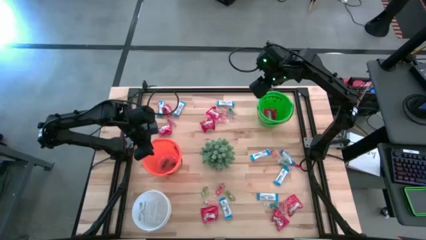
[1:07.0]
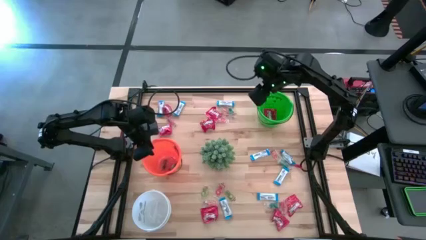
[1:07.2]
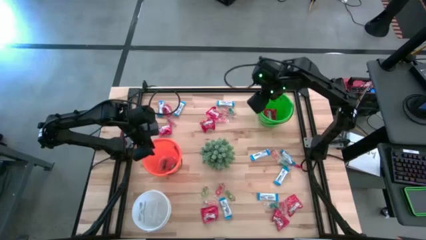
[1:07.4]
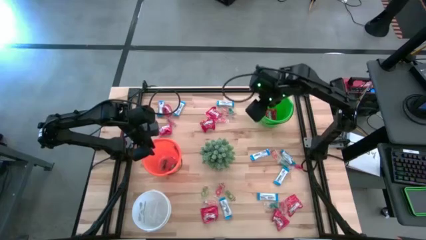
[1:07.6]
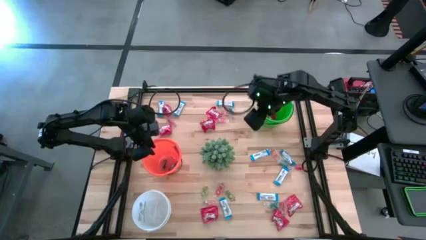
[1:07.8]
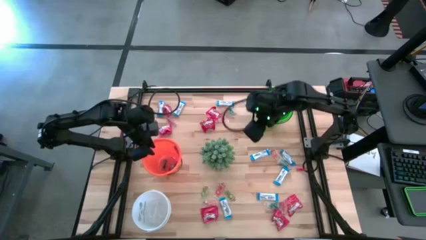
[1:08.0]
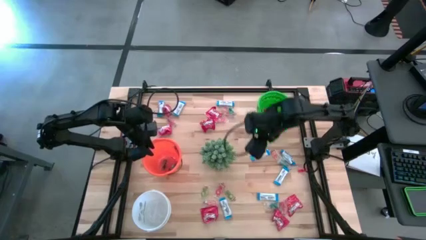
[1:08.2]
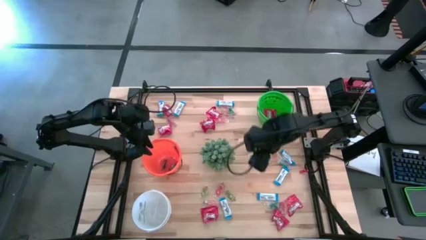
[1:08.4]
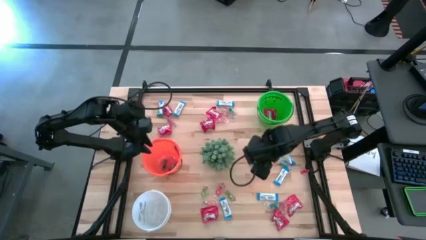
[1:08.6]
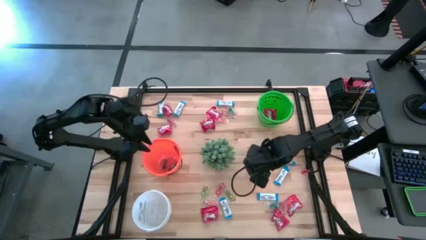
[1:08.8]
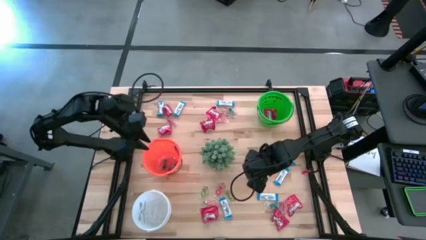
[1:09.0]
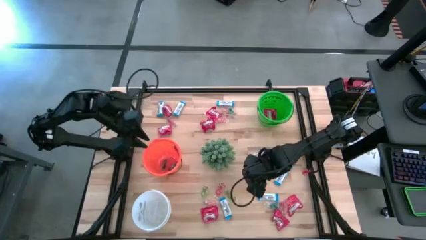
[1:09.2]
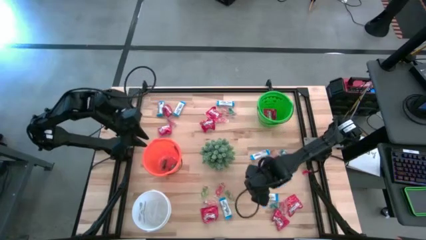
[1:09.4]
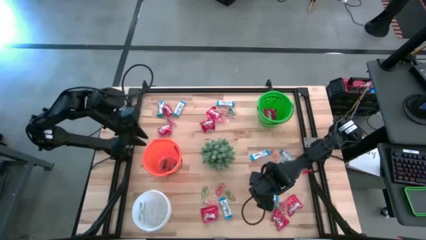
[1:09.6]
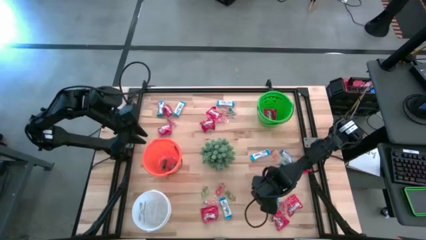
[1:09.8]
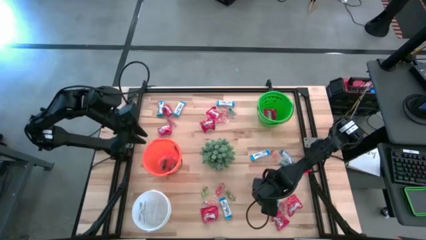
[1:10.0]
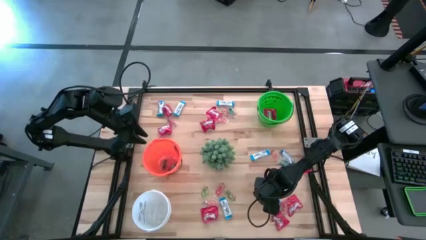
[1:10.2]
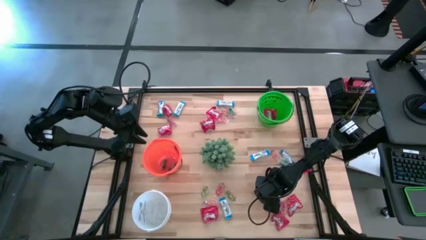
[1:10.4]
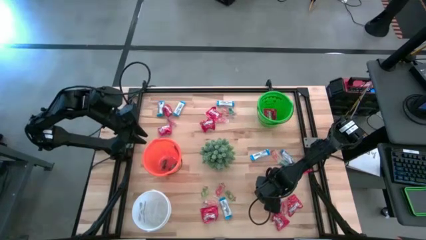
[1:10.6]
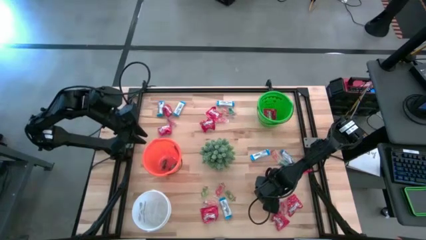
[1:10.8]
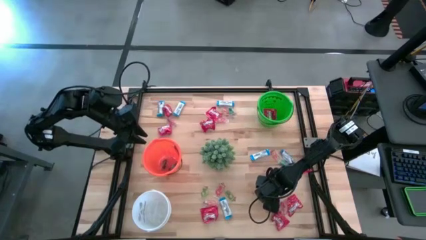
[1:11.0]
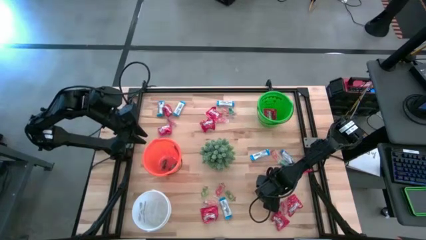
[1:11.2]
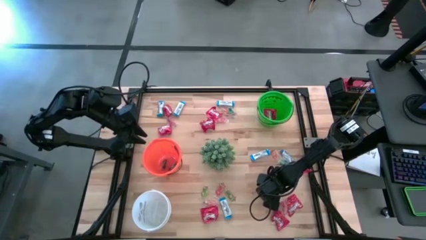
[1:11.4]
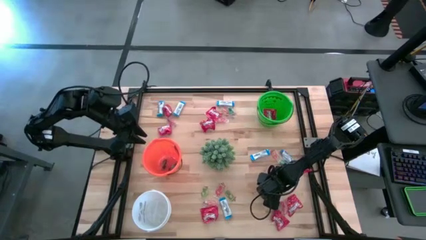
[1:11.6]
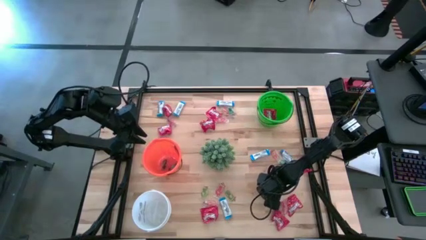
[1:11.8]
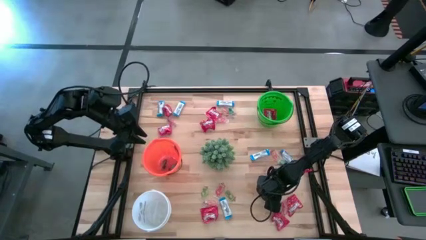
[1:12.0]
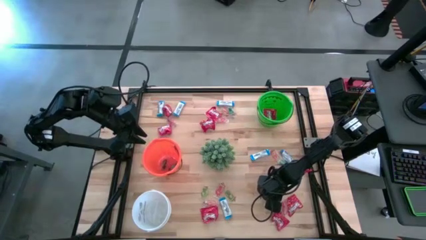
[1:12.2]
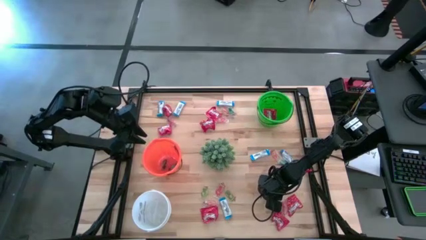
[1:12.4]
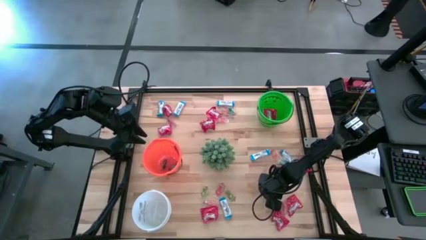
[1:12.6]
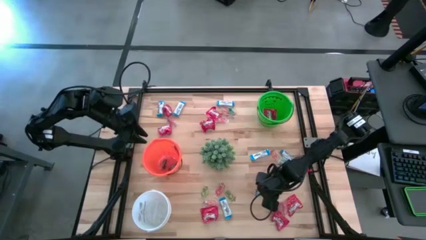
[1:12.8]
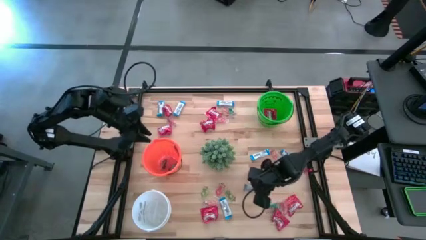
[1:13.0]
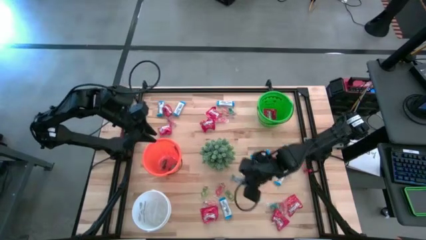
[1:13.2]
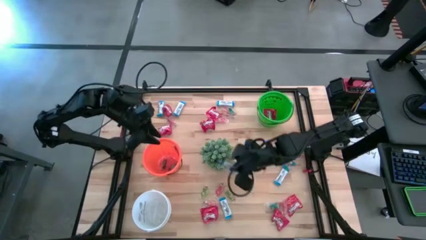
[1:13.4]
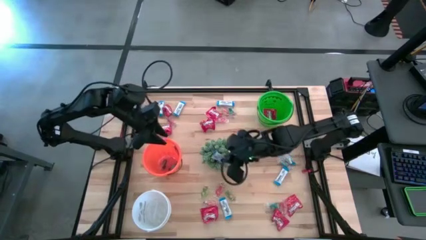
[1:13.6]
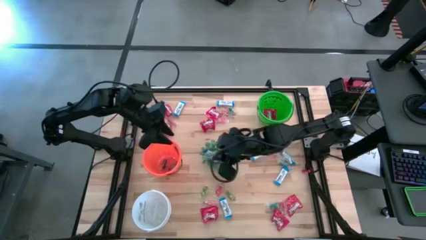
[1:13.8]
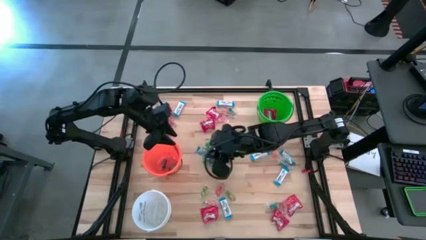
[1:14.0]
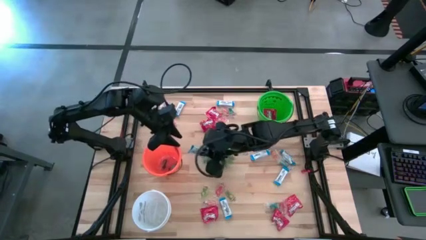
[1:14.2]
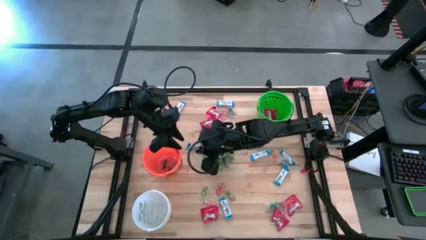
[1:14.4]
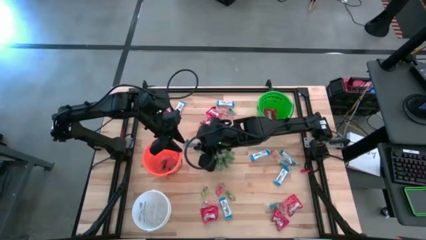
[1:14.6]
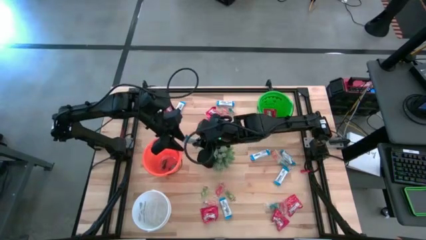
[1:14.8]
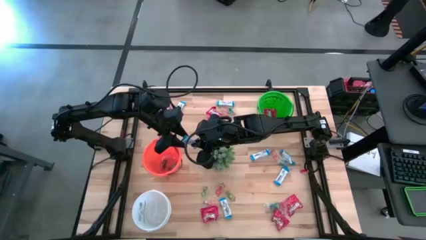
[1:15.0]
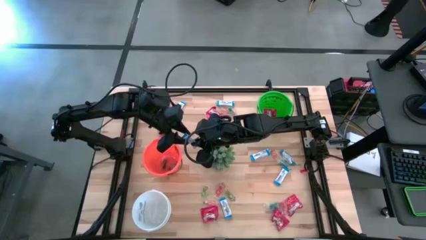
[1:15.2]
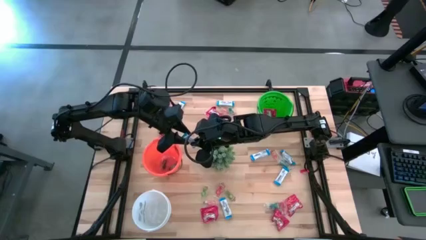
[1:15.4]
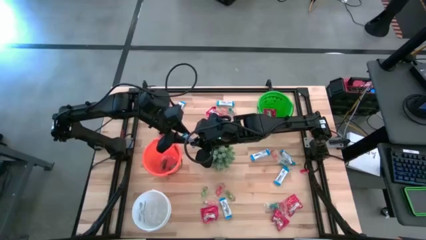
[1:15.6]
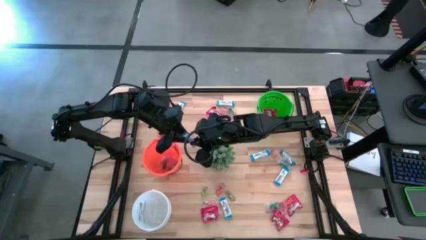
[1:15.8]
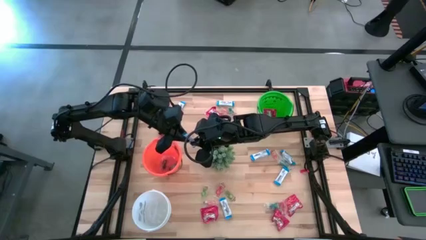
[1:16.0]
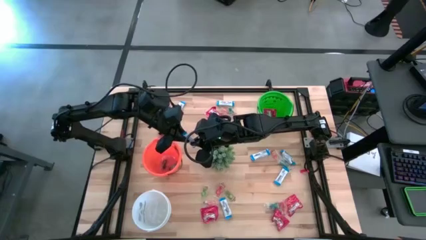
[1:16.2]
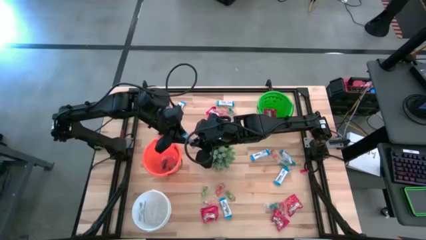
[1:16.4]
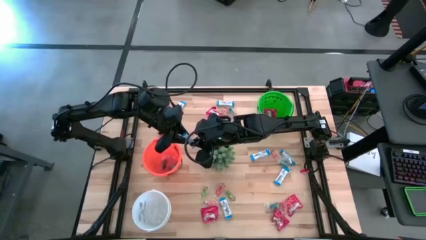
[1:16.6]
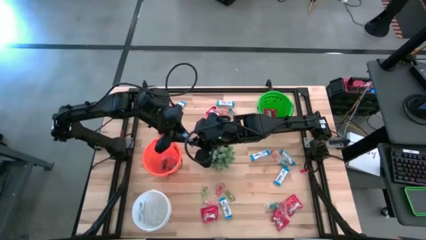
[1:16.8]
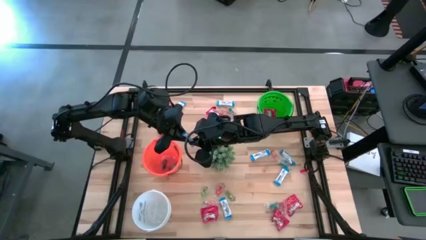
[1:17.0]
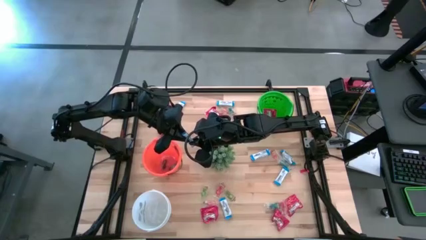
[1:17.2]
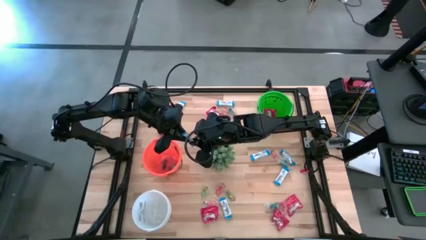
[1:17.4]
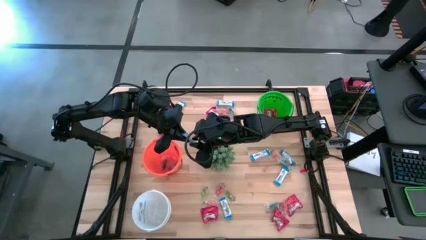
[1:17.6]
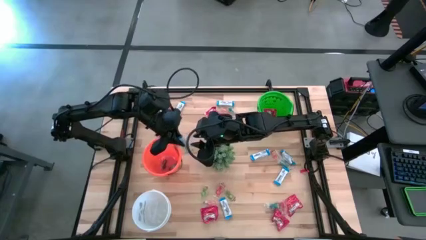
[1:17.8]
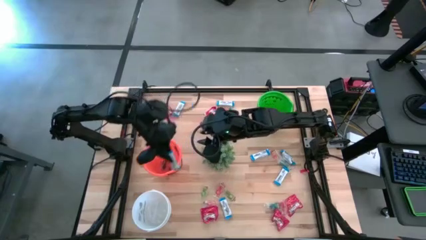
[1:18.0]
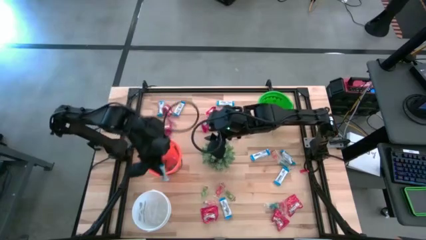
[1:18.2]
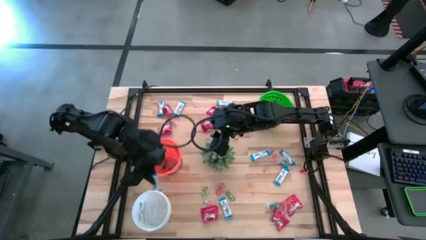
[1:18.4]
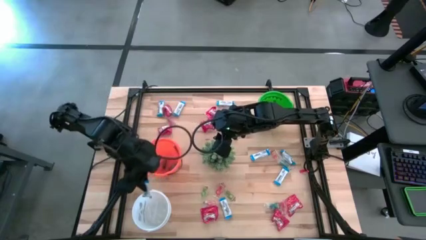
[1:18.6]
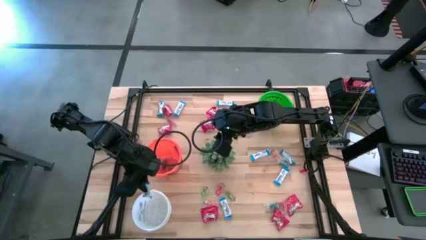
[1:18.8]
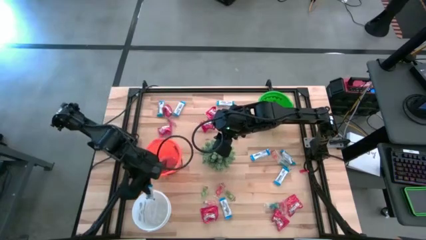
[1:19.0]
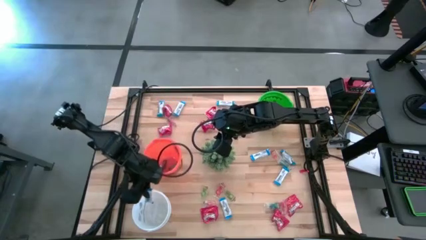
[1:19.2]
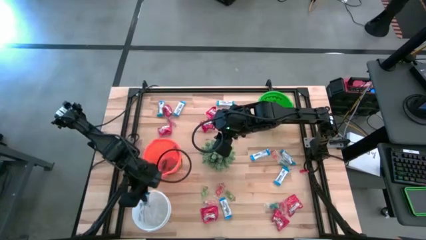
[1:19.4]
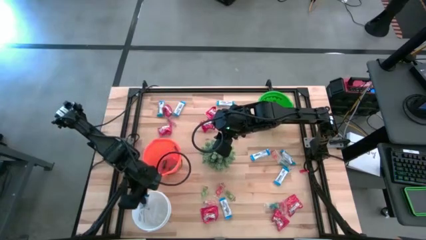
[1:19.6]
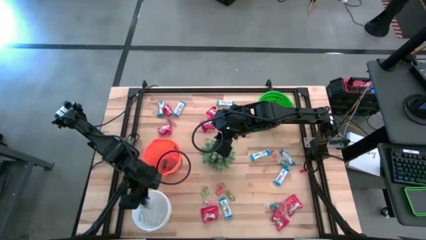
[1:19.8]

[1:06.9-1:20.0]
Task: Sort candy
Put the white chocolate into the white bucket

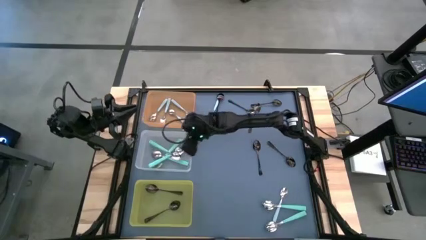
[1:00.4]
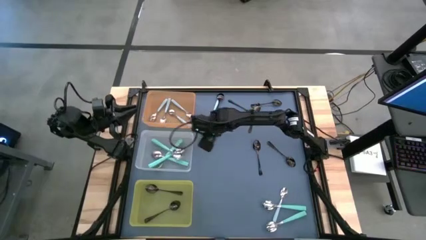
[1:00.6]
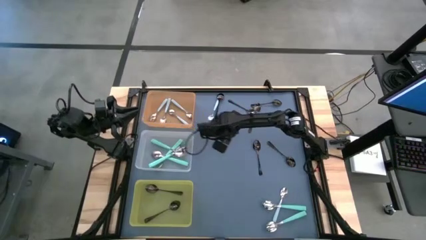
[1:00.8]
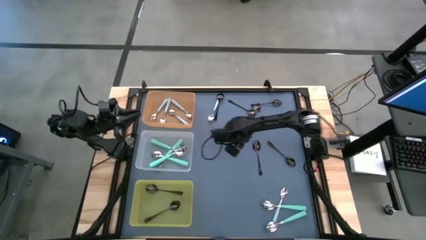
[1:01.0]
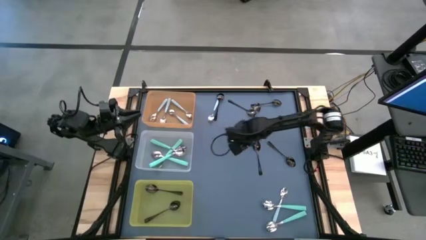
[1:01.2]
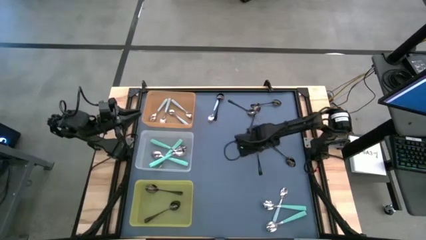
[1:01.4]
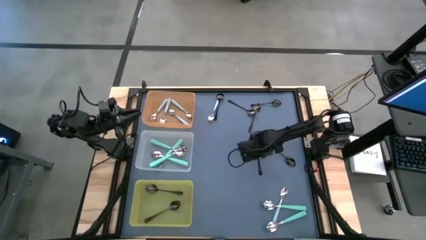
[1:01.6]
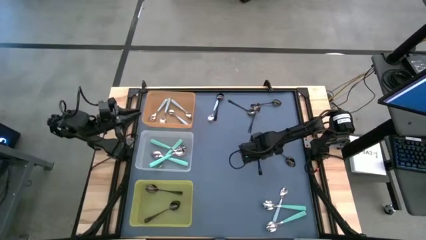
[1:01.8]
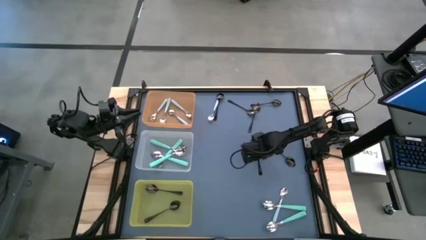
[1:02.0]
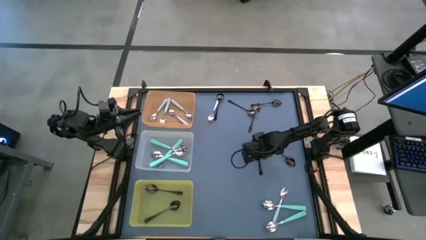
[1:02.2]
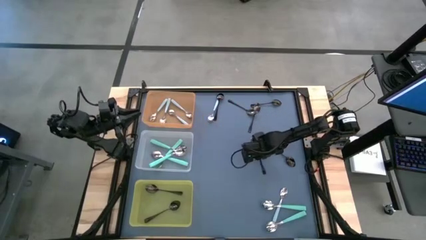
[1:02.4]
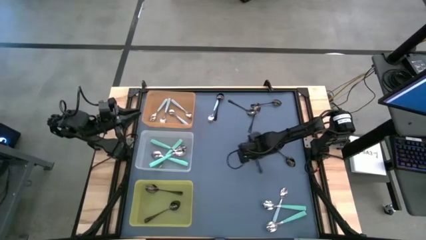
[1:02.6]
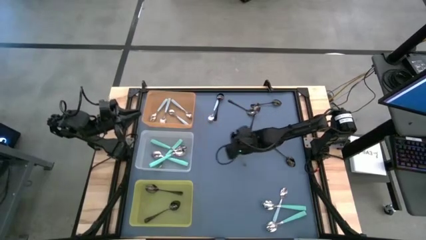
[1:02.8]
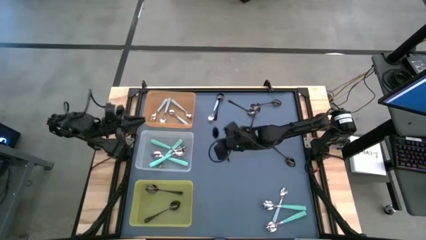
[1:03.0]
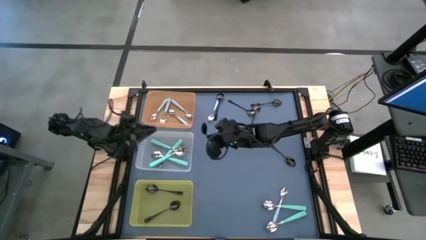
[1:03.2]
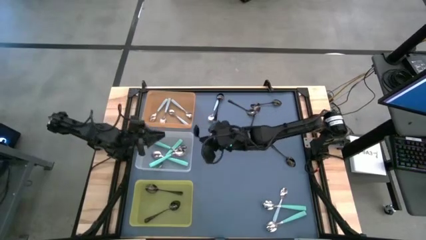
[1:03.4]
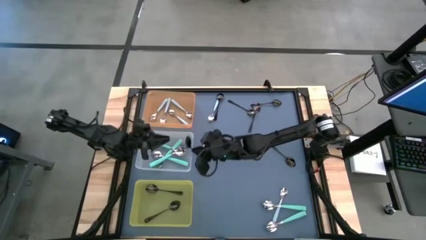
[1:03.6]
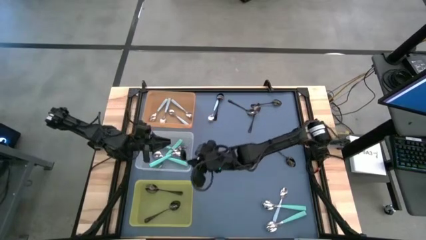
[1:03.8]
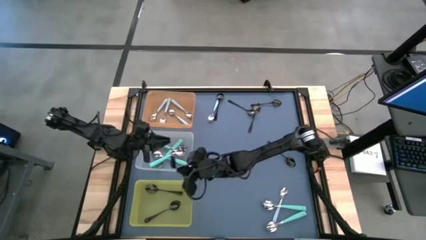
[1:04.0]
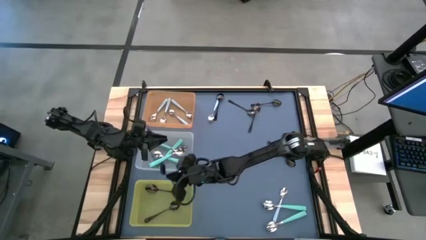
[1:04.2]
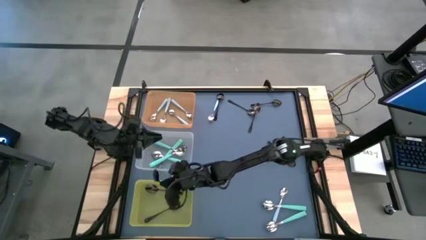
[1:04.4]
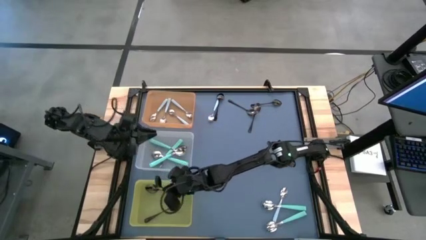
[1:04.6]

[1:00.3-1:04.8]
Task: Sort silverware by color (type)
Put the black spoon into the yellow bin
